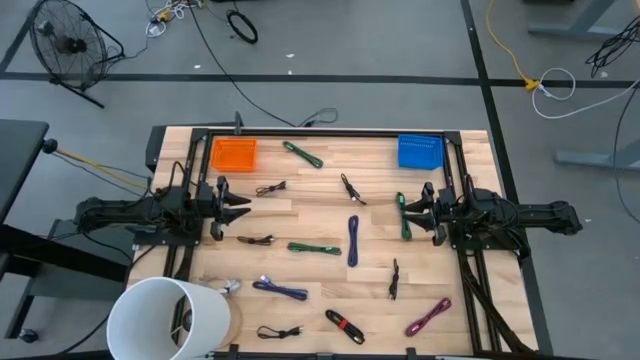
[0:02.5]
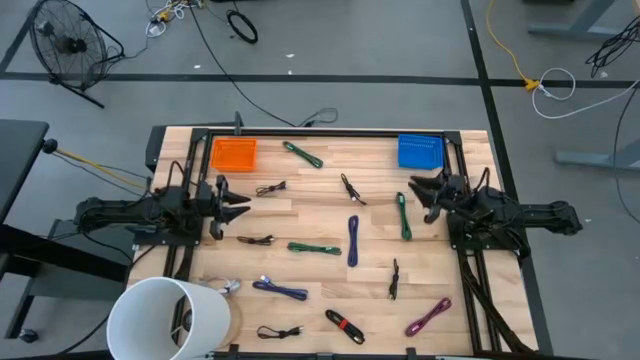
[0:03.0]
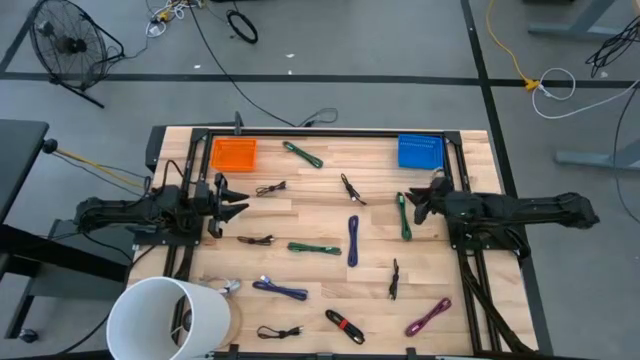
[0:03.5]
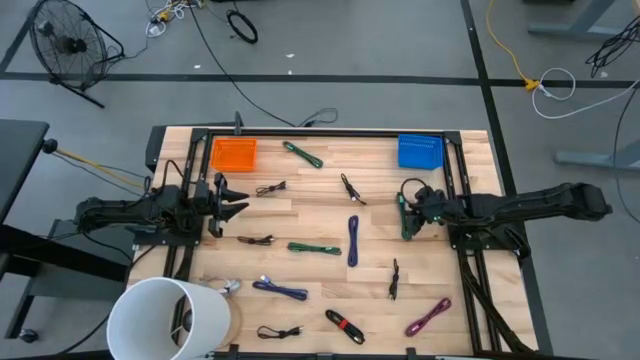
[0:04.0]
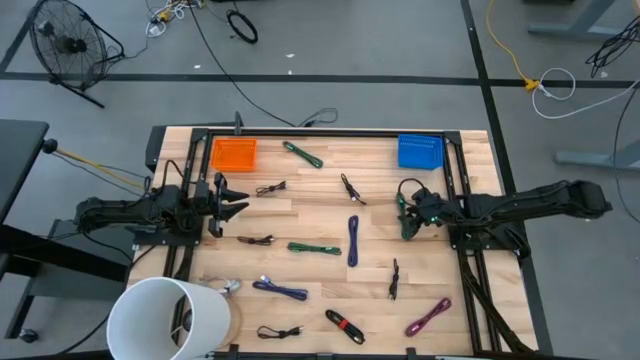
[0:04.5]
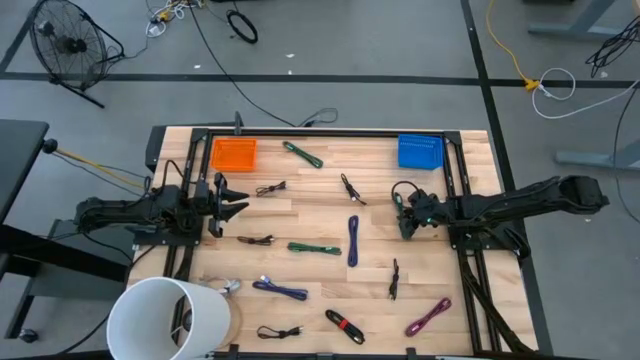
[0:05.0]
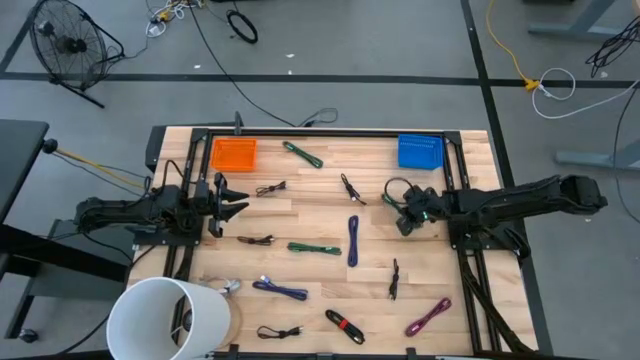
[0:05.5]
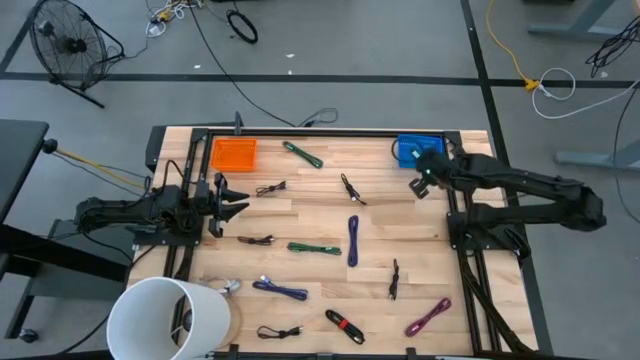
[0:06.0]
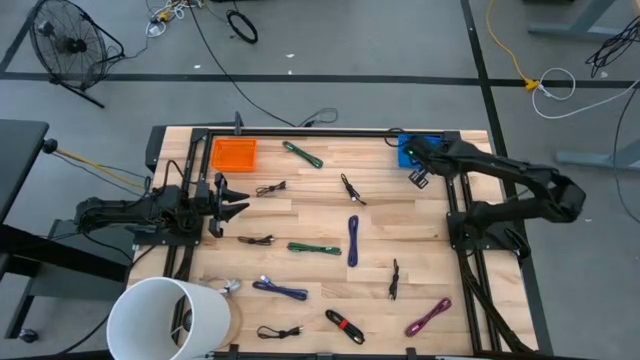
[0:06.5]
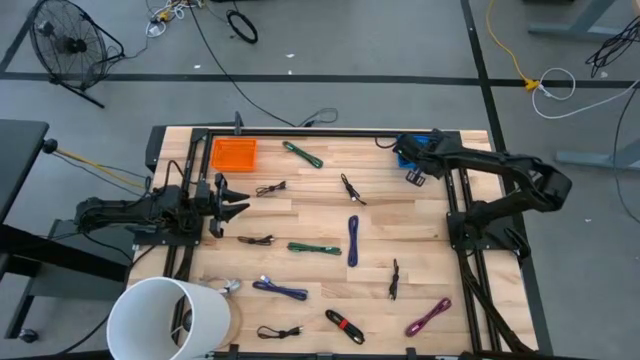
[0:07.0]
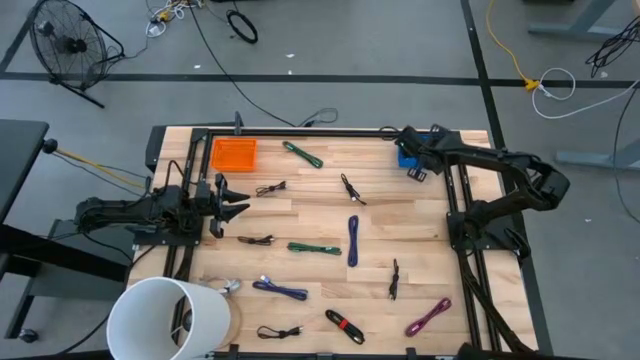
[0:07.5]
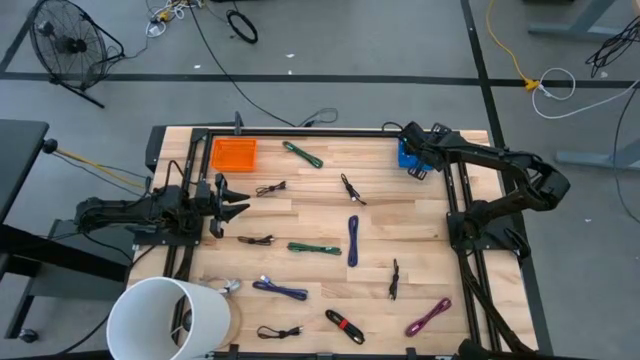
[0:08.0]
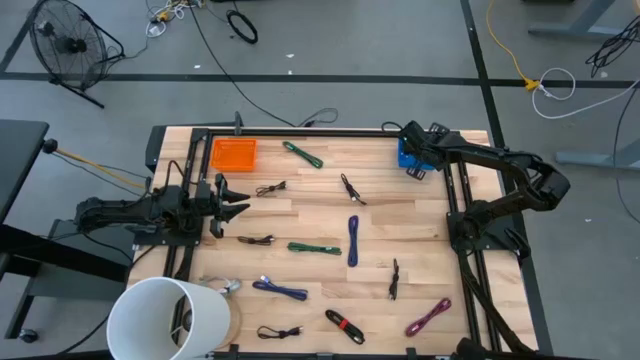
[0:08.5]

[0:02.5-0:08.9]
Task: Pick & Place USB Port
Put the green charger cable into the blue bin

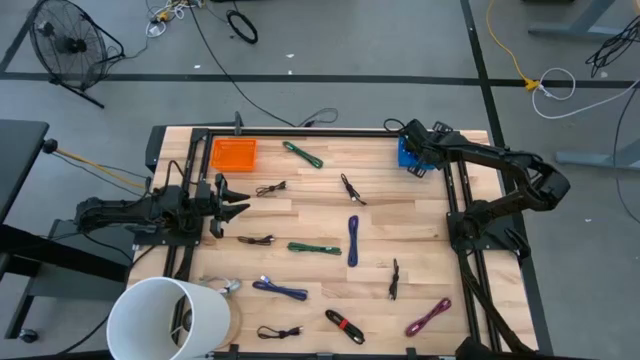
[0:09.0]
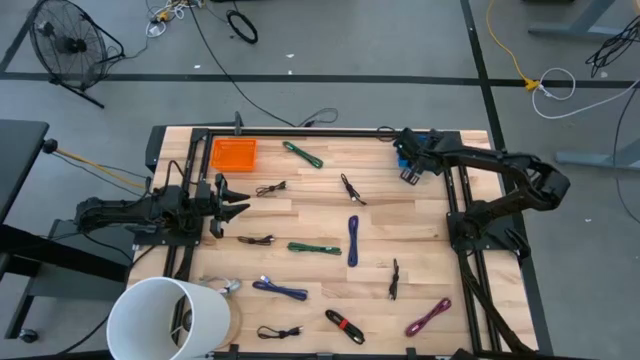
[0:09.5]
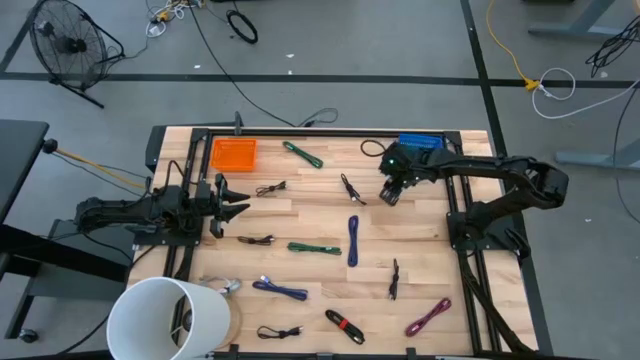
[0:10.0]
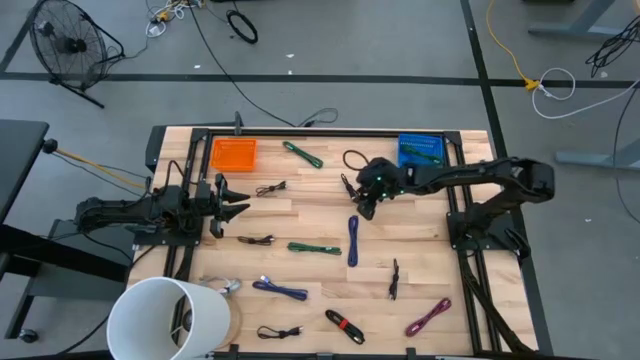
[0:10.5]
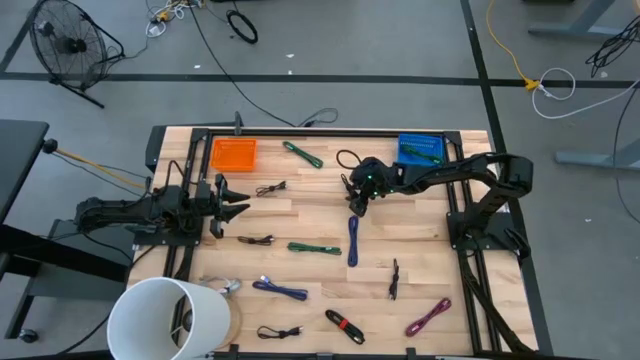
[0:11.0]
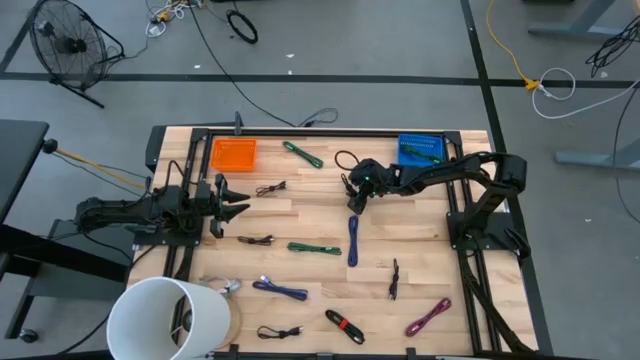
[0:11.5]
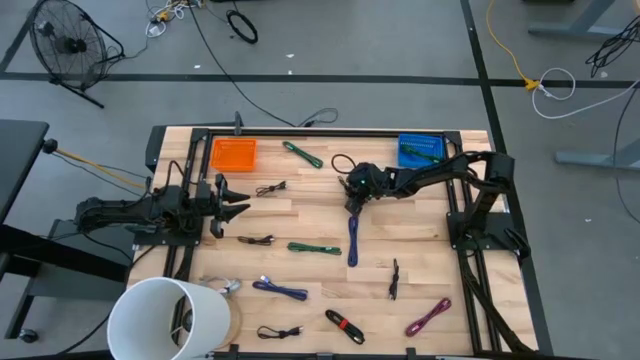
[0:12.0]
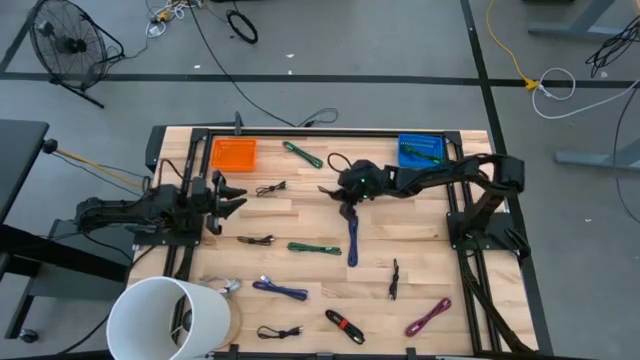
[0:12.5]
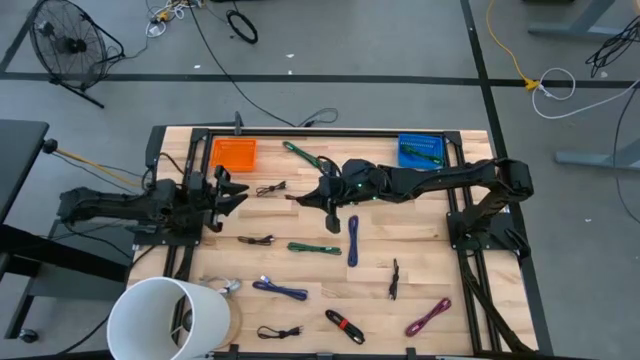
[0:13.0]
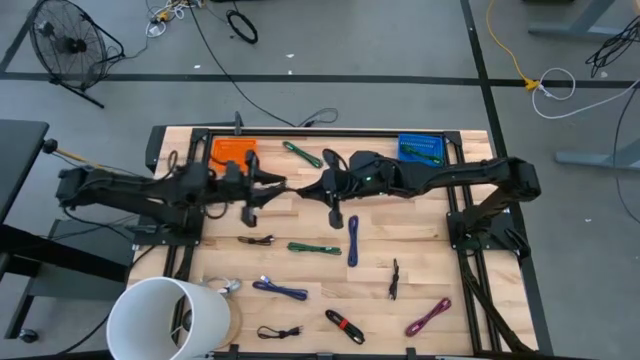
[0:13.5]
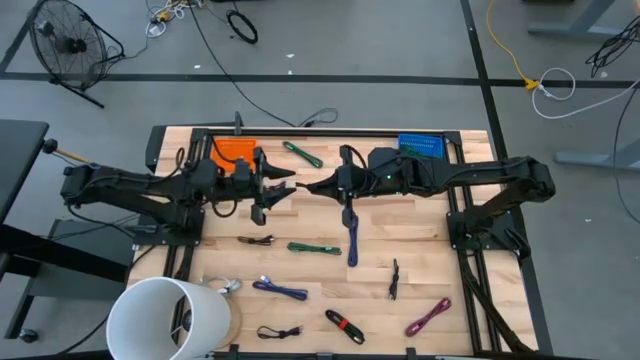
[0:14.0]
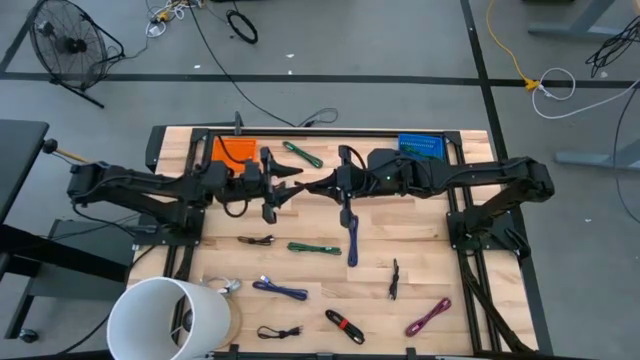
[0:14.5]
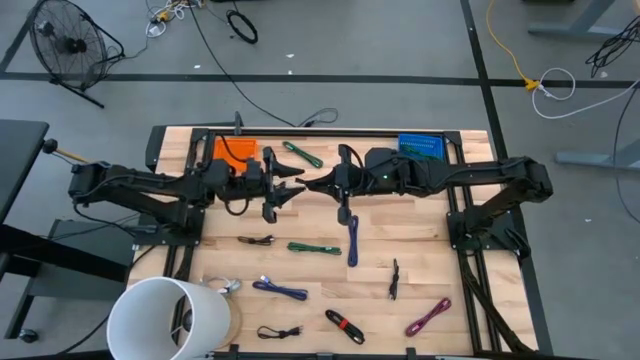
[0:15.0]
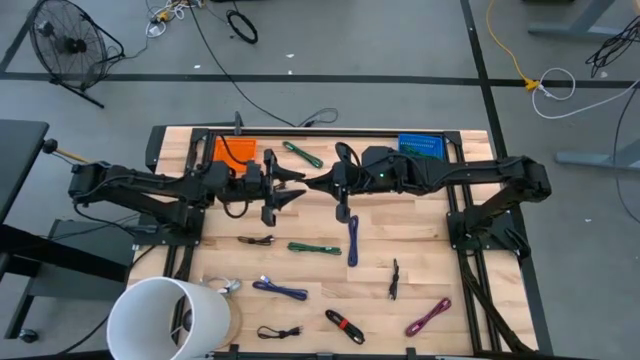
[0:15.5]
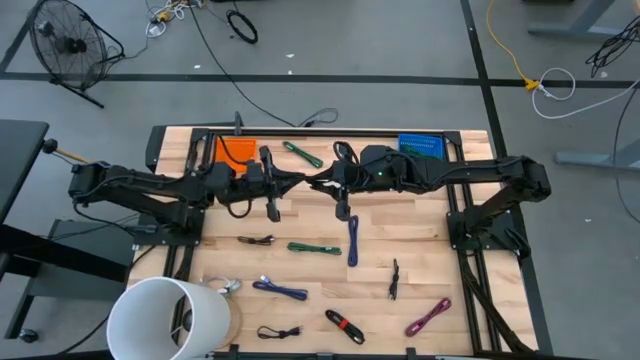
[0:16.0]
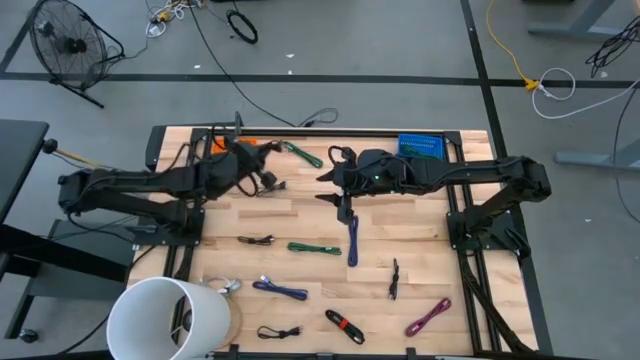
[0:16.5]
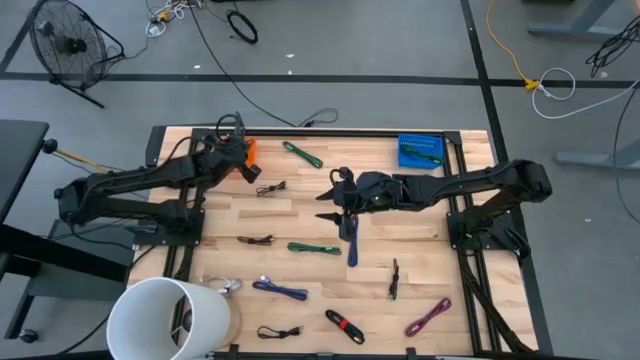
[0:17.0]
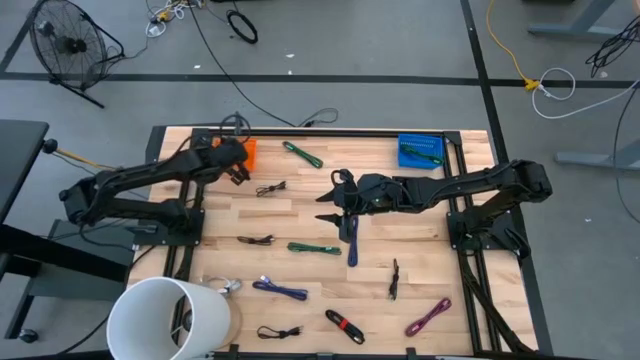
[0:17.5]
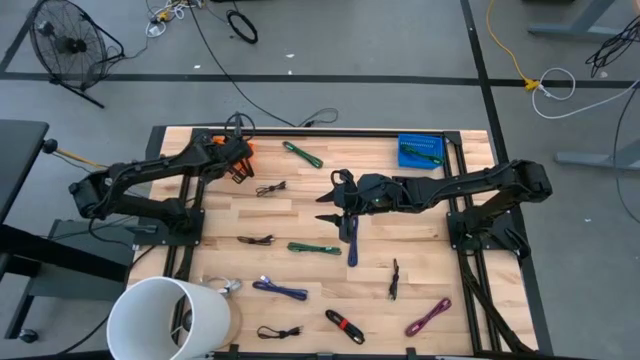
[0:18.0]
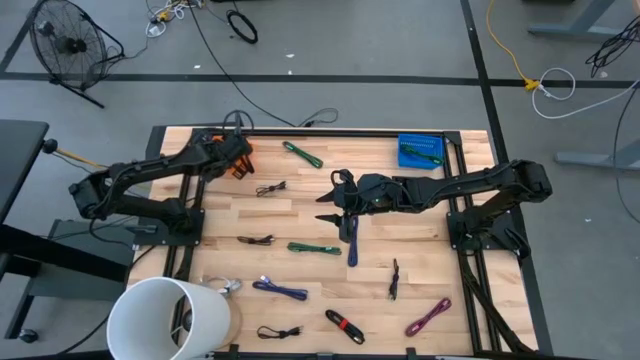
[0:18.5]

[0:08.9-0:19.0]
Put the black charger cable into the orange bin

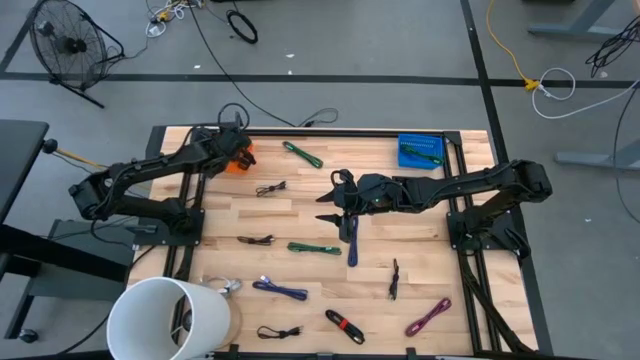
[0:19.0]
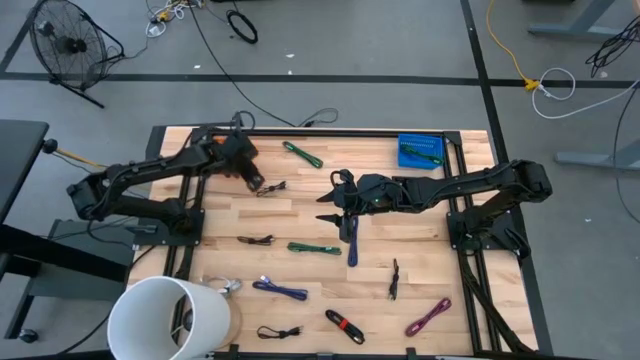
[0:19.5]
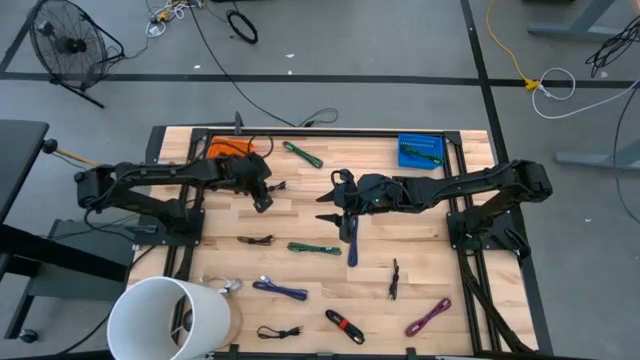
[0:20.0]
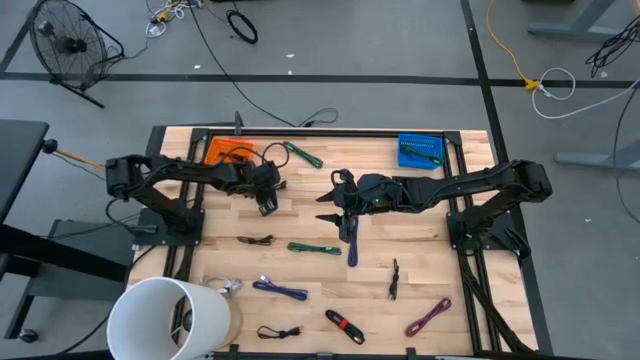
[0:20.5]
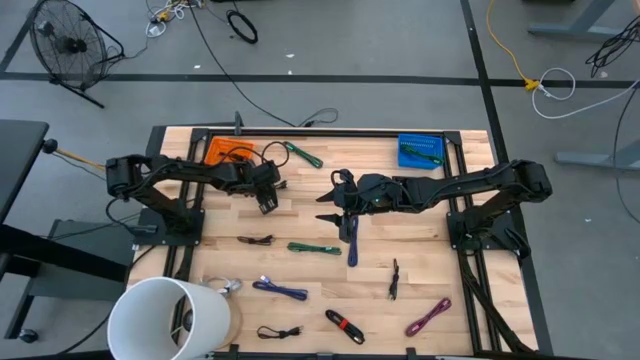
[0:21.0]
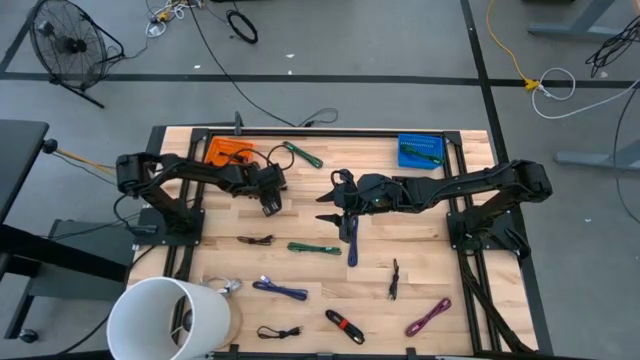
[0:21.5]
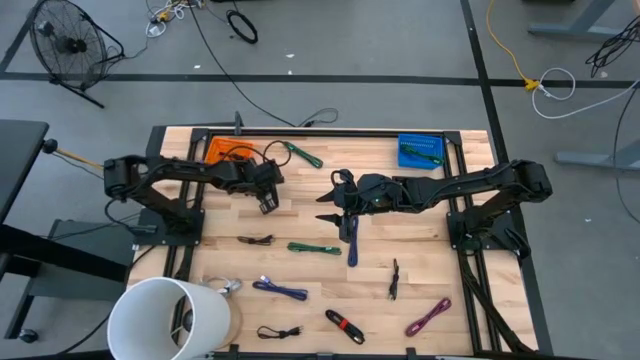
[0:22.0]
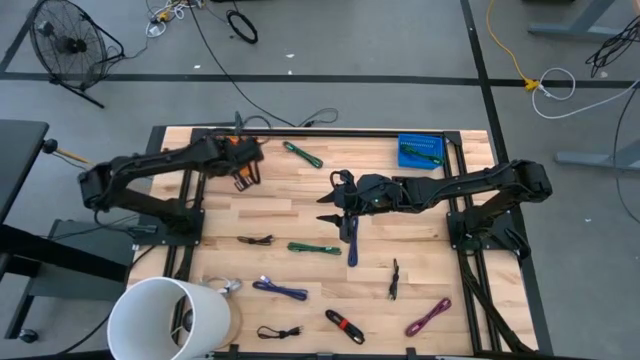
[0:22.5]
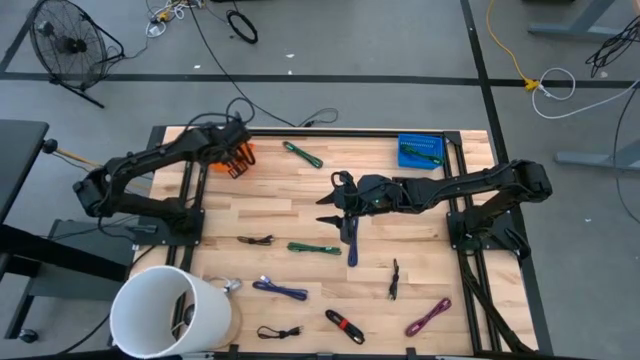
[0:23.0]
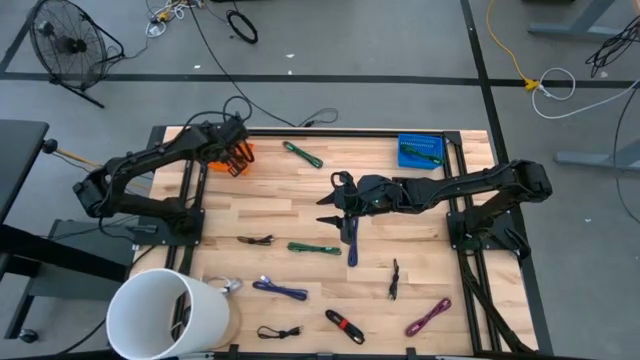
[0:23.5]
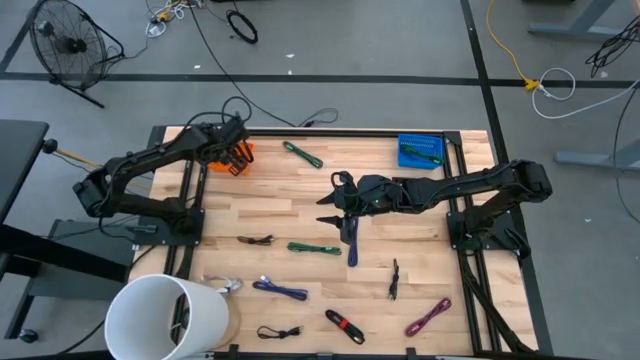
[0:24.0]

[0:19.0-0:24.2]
Put the black charger cable into the orange bin
